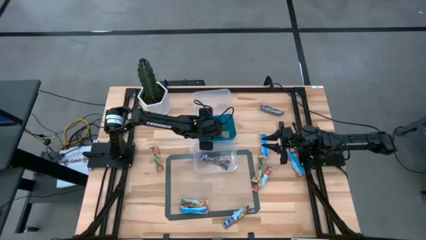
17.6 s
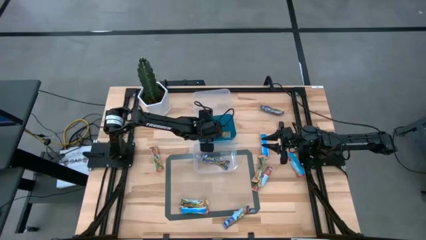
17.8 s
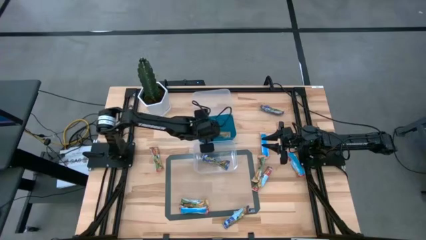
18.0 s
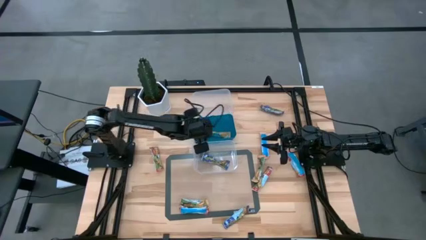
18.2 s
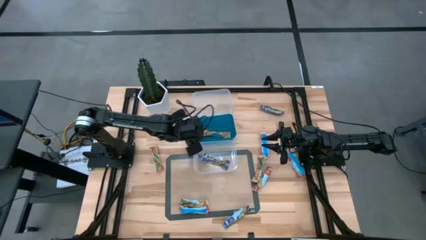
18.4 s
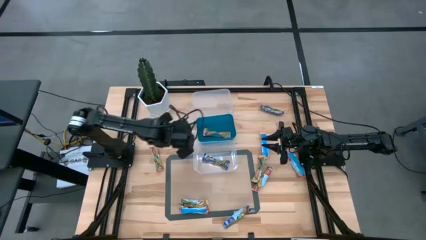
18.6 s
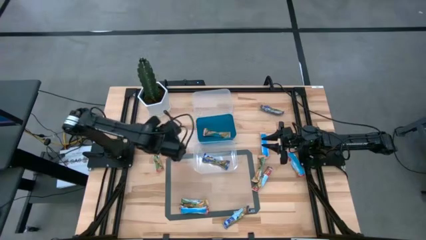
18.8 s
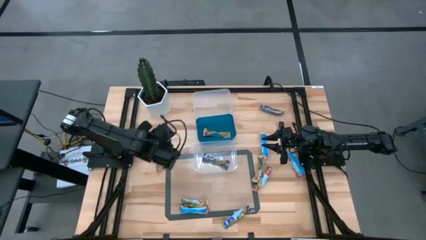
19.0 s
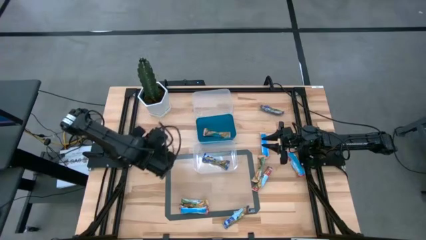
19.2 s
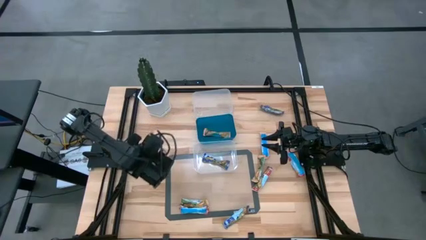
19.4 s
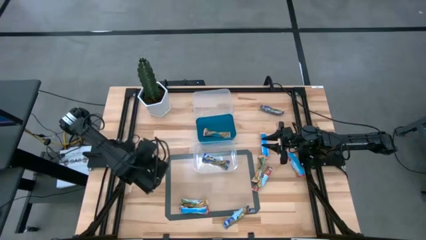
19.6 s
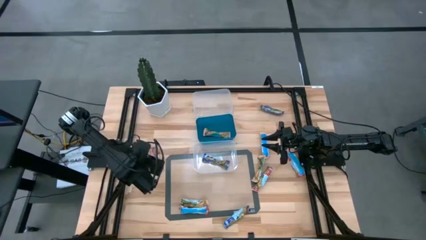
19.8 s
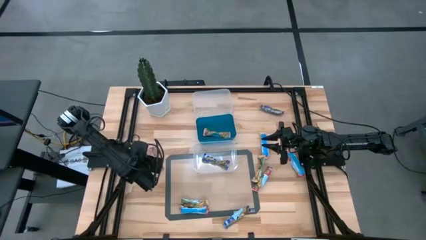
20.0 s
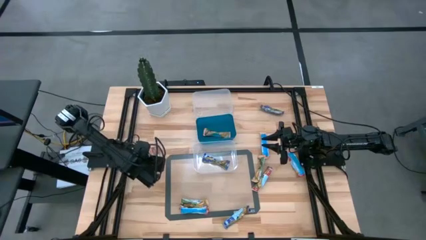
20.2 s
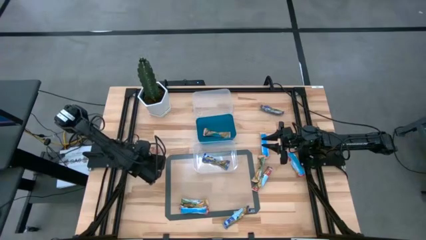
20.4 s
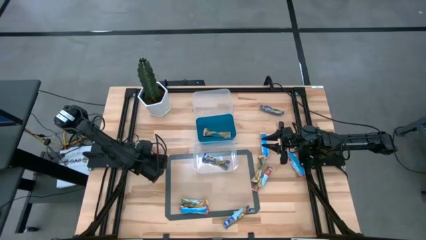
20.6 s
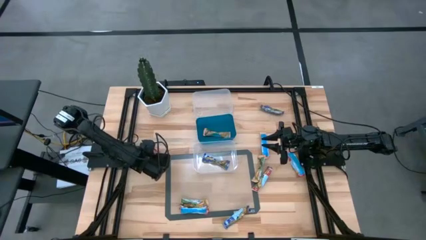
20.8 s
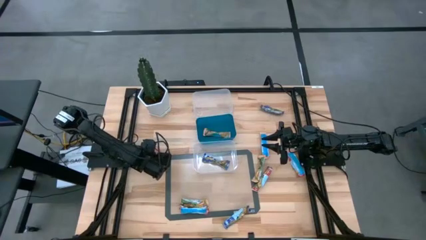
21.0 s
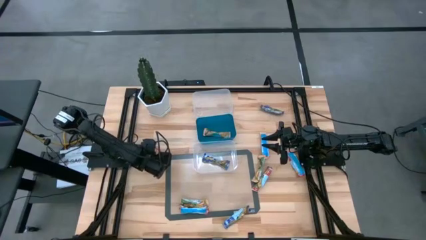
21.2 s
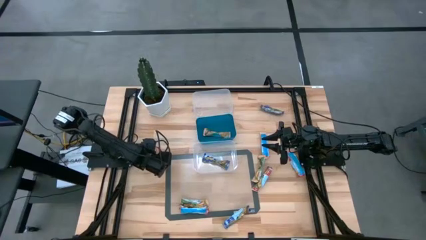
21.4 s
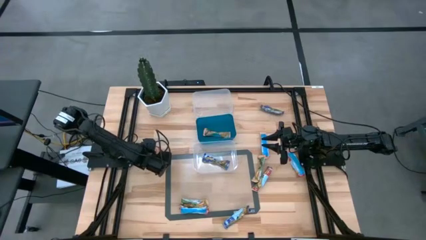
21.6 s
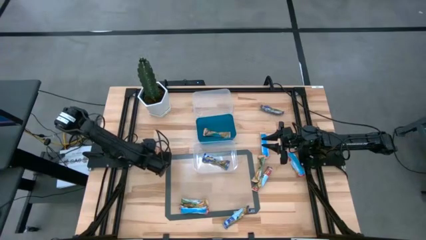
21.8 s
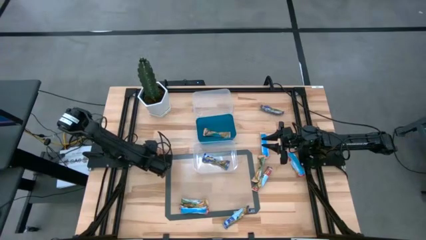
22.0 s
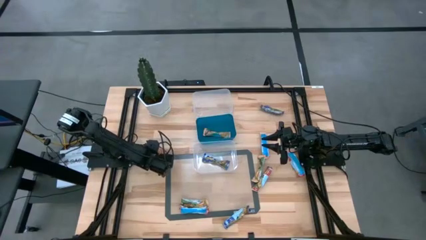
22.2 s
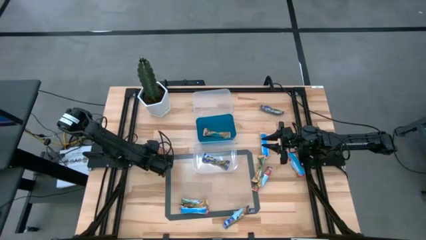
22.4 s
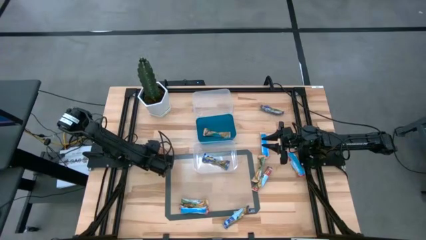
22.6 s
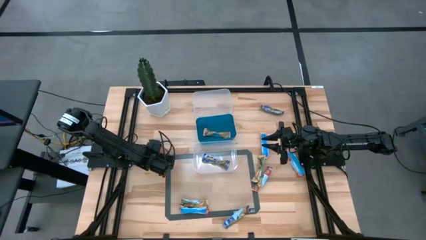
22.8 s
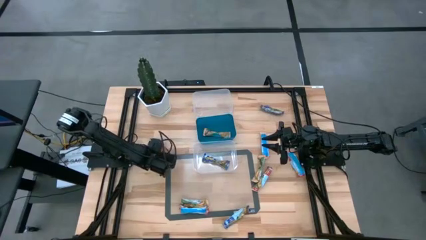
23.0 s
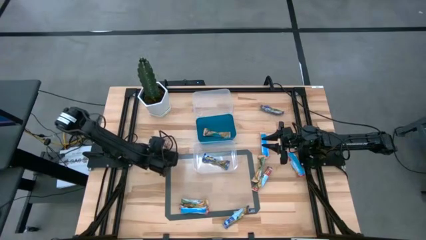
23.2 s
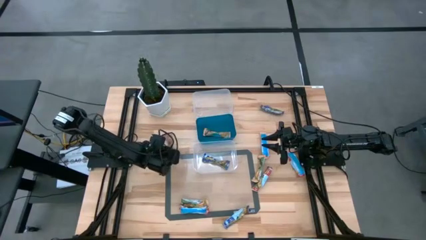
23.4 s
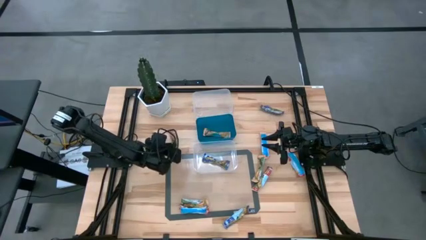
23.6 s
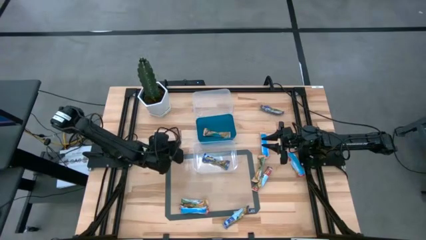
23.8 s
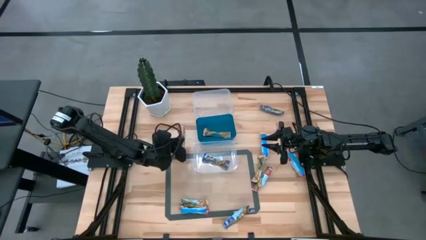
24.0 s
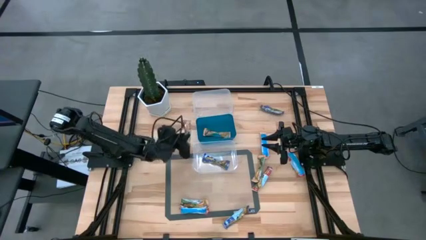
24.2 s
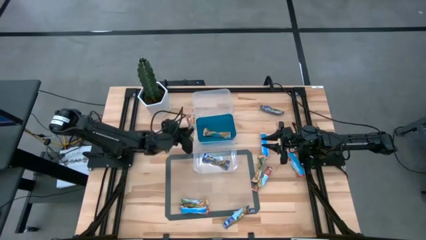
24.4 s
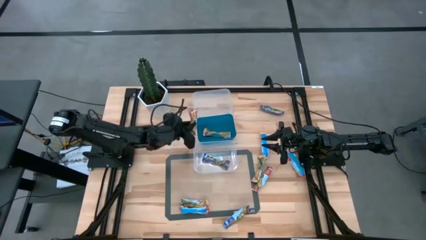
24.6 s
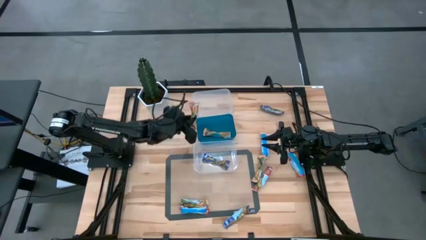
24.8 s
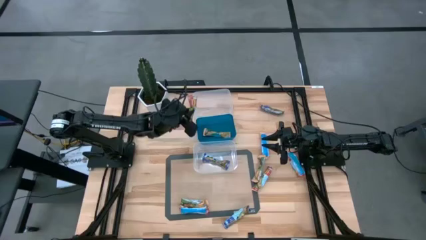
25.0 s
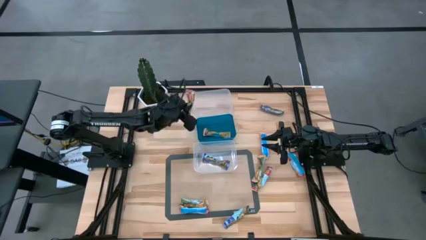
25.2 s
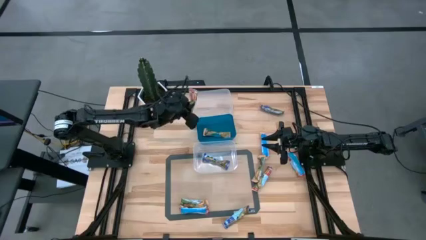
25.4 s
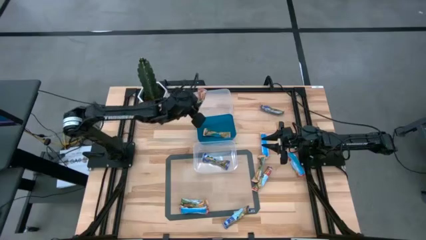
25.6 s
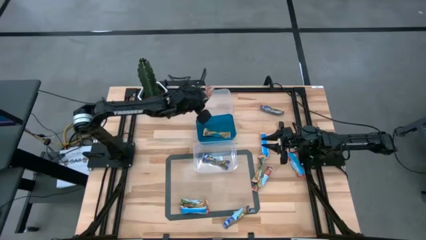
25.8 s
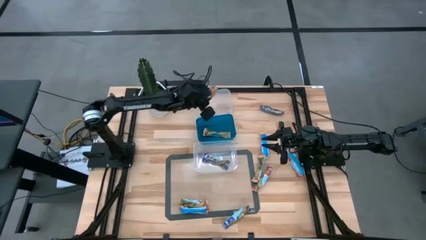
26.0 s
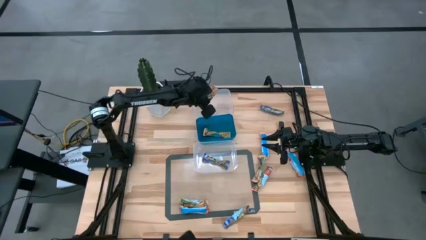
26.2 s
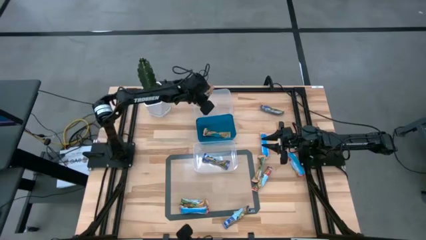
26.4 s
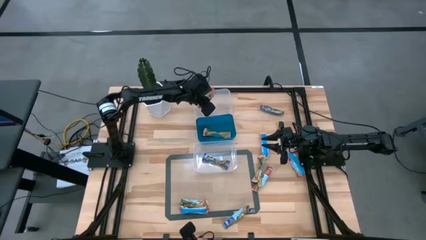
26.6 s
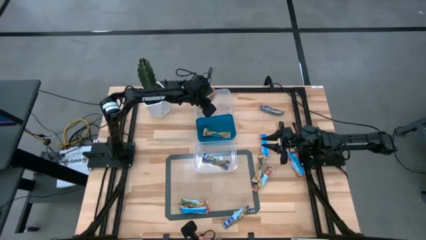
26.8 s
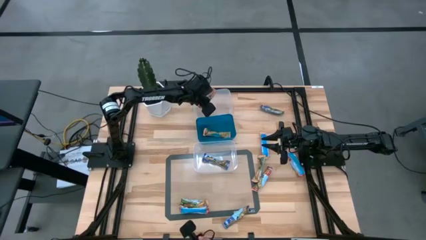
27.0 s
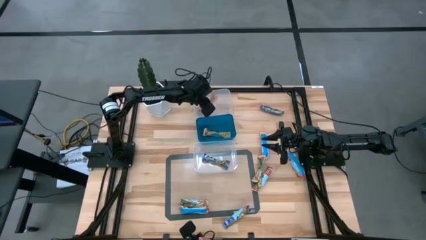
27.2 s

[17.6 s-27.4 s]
Task: Pick and place Granola Bars by type
Put the red granola bar into the top transparent bin

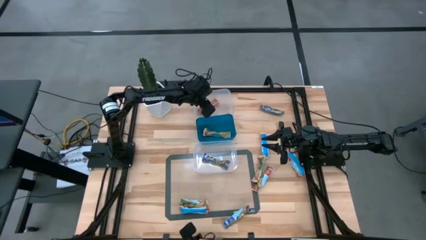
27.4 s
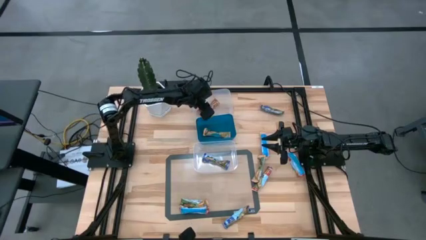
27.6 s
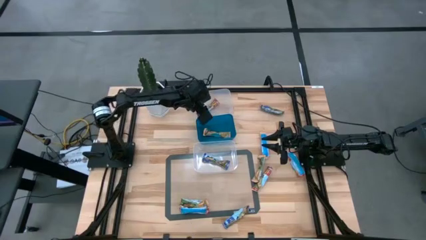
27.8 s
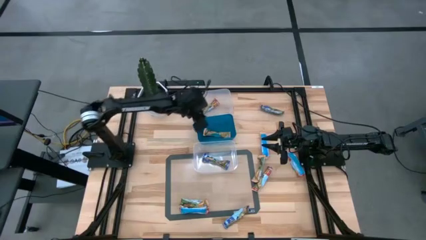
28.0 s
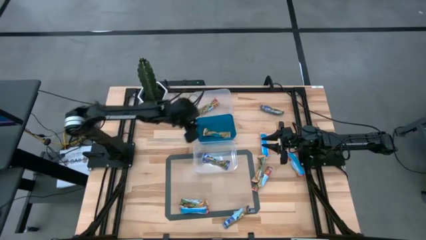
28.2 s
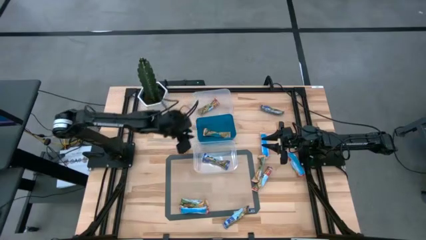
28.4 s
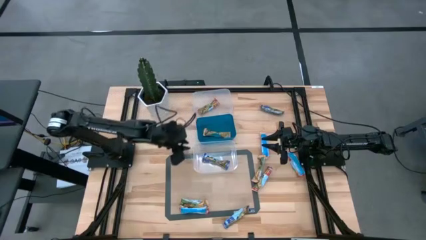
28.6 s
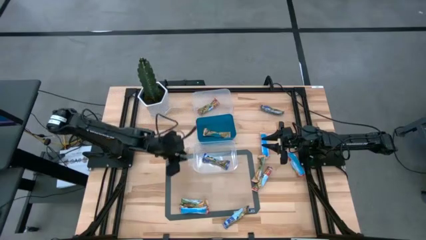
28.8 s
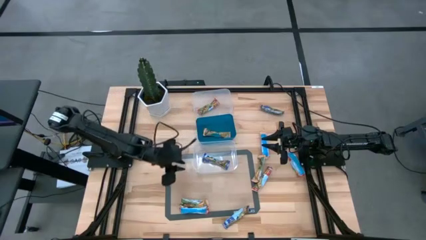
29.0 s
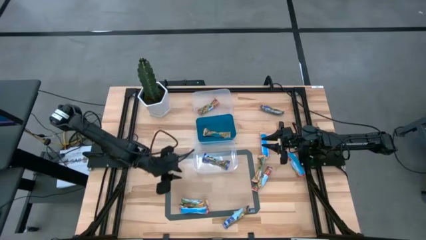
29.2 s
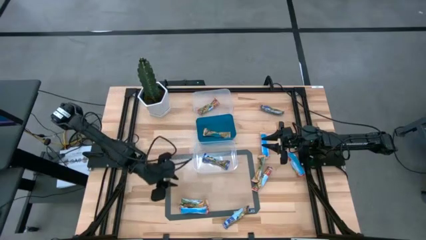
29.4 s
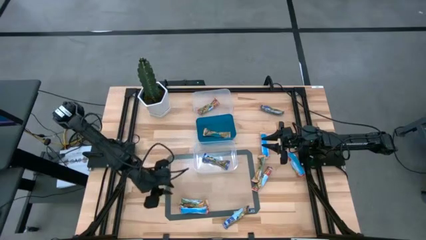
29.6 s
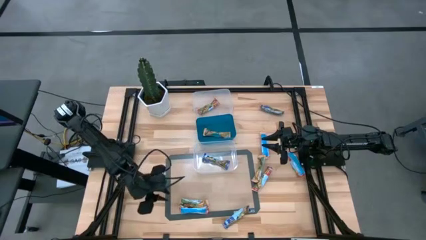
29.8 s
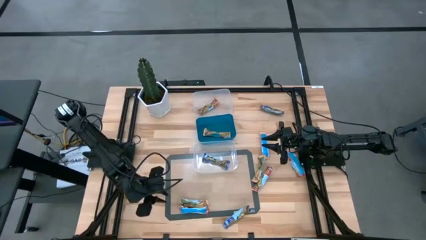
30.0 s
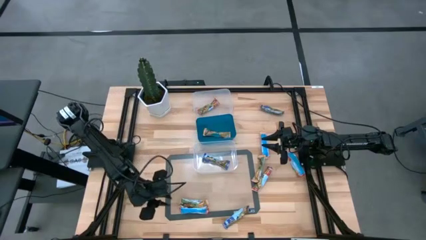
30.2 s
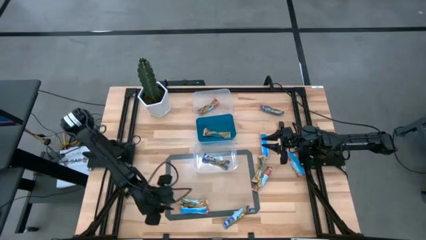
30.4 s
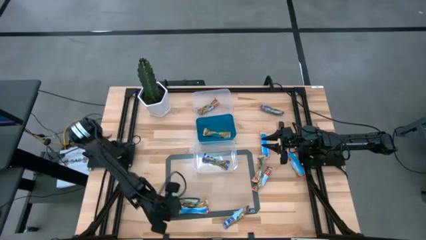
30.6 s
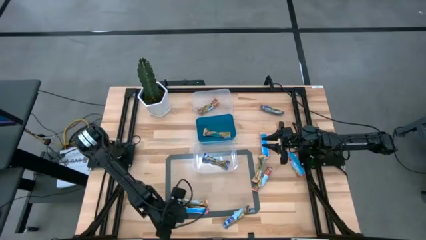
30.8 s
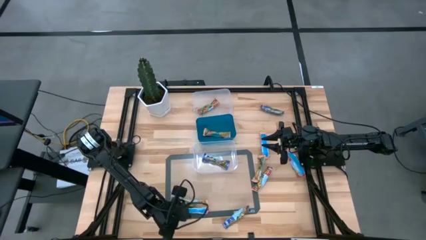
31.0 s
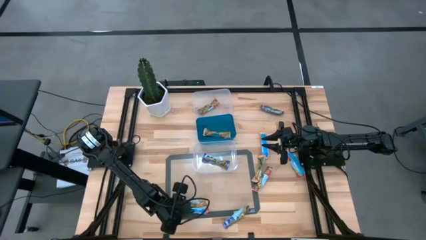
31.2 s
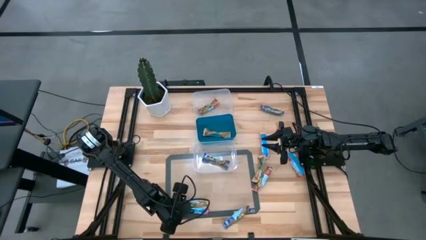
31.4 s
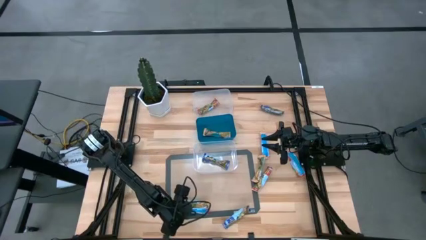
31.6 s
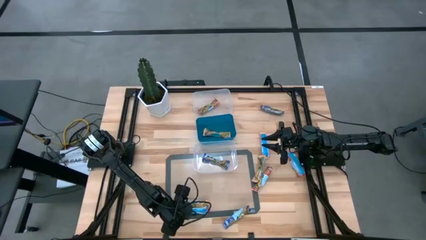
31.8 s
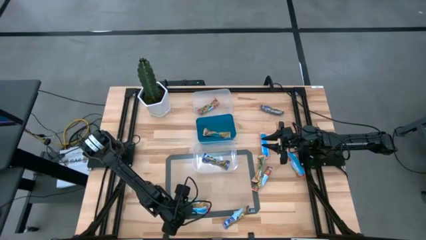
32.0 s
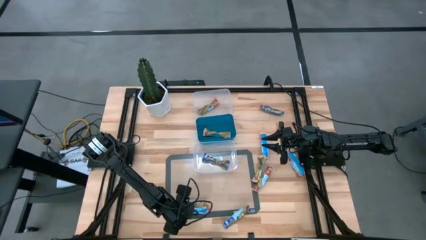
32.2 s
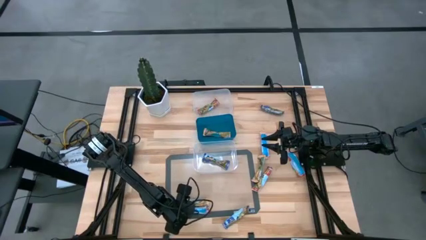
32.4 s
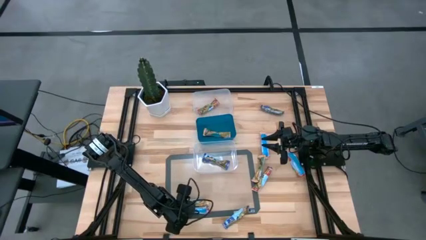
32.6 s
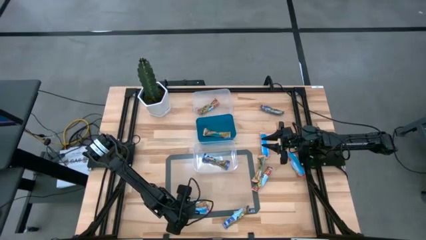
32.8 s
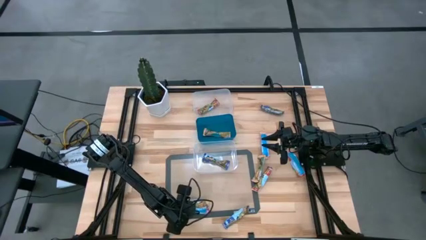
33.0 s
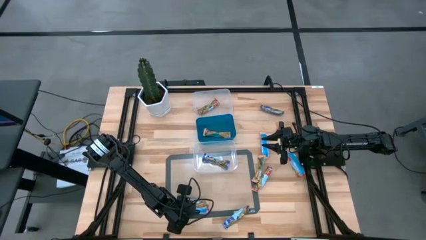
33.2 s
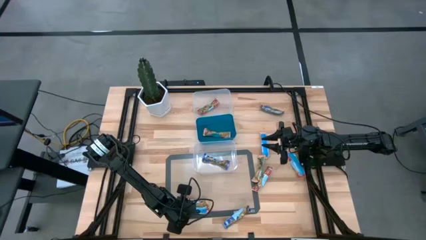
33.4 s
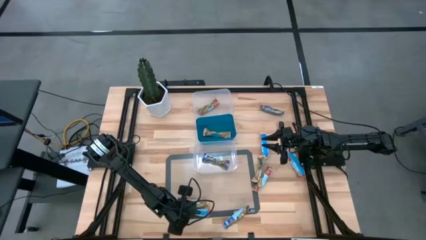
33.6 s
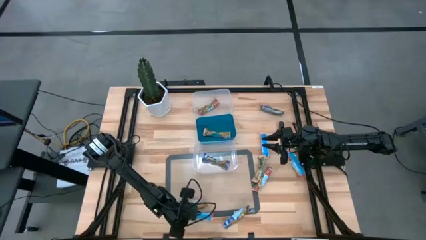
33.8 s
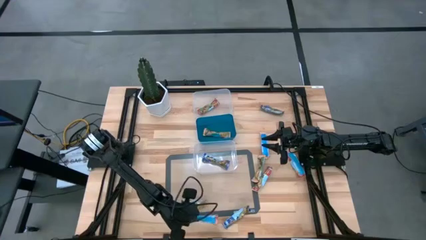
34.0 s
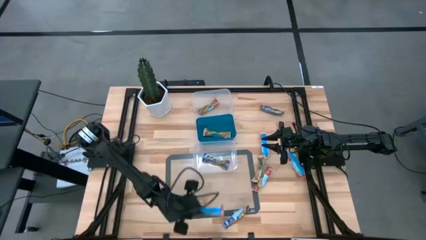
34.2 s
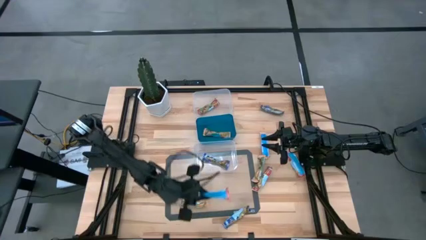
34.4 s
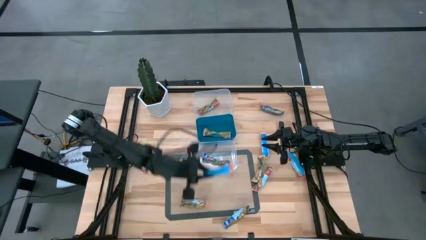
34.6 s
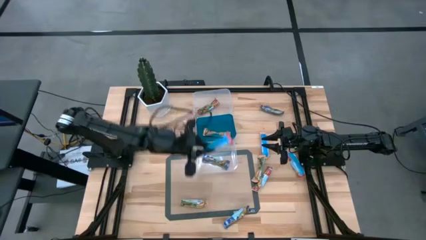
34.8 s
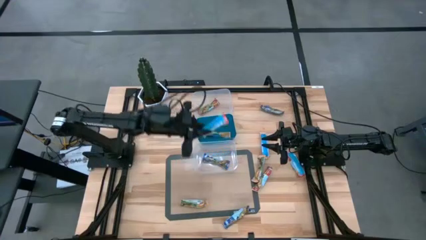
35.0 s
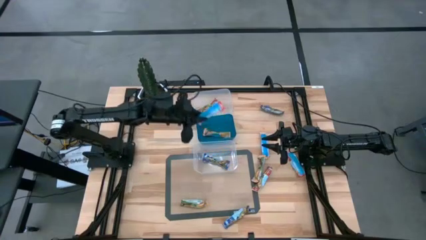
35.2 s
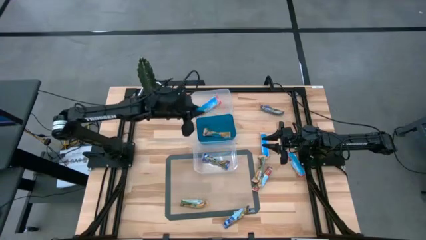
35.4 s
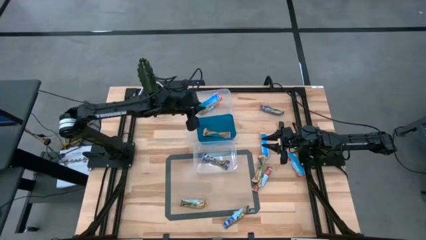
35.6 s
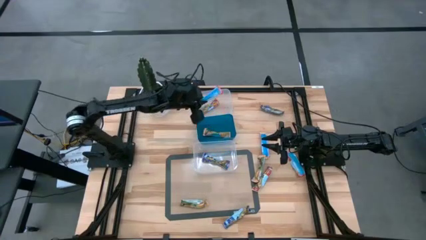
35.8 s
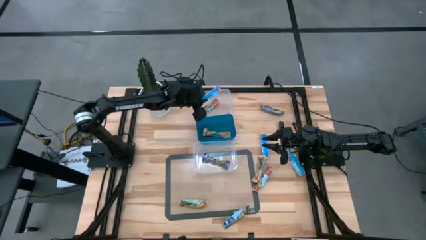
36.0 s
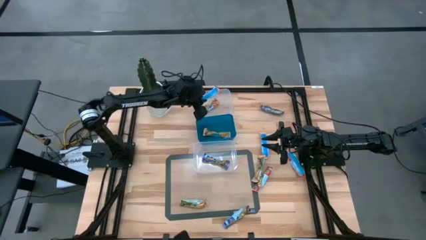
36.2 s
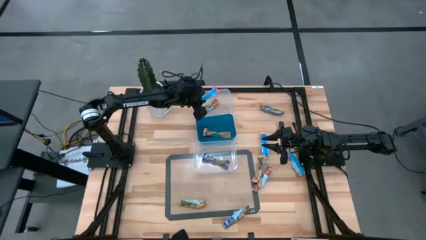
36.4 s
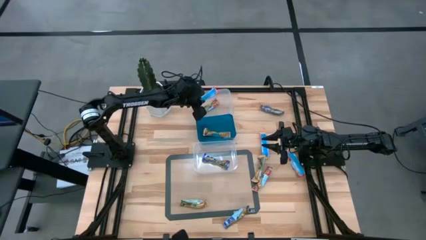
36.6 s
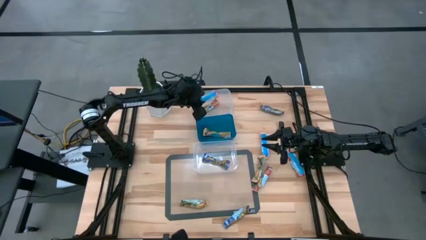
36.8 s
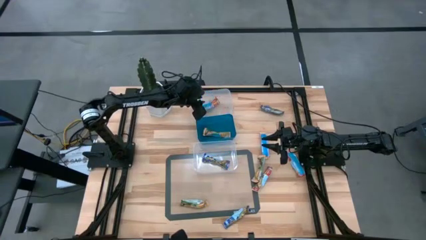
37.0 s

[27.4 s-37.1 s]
Put the red granola bar into the top transparent bin
